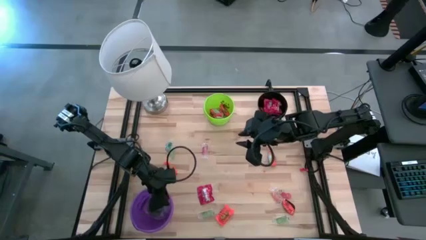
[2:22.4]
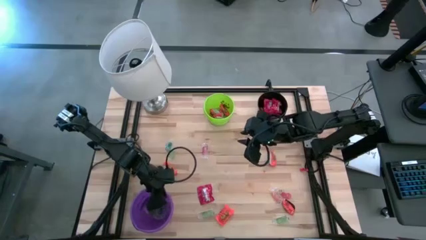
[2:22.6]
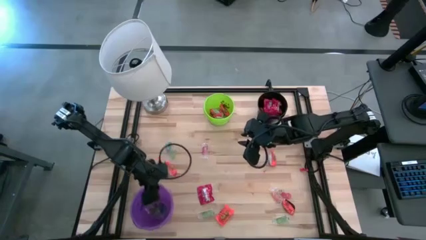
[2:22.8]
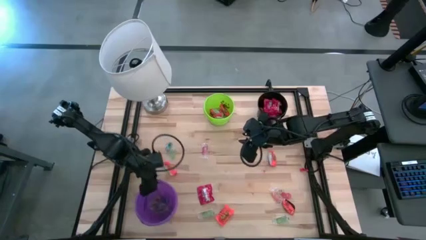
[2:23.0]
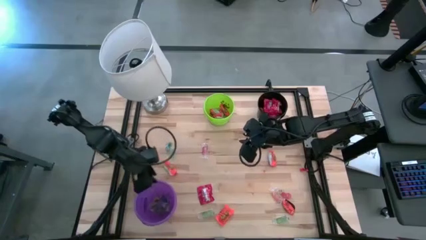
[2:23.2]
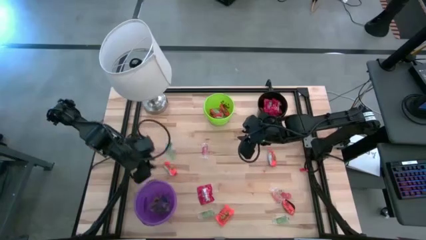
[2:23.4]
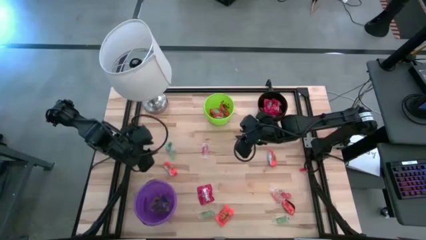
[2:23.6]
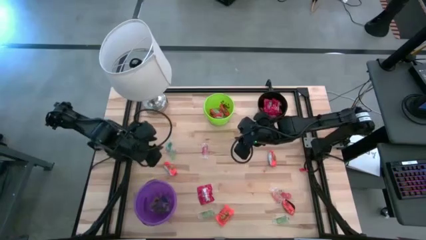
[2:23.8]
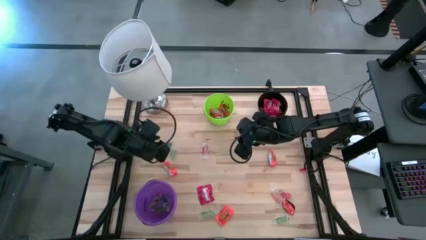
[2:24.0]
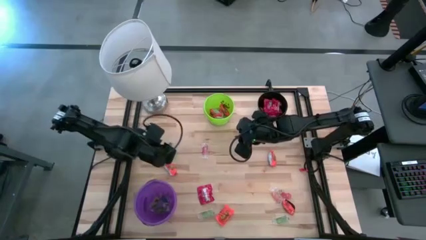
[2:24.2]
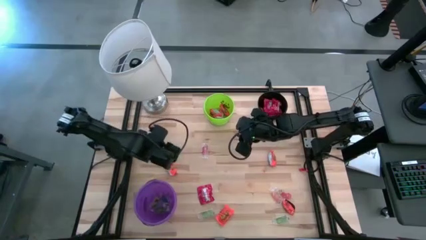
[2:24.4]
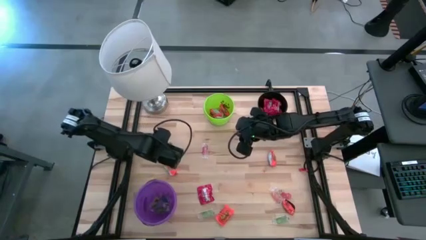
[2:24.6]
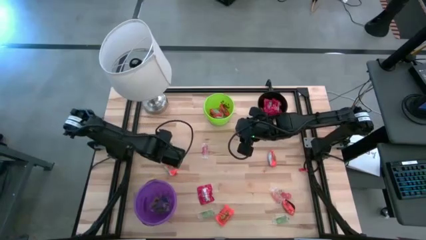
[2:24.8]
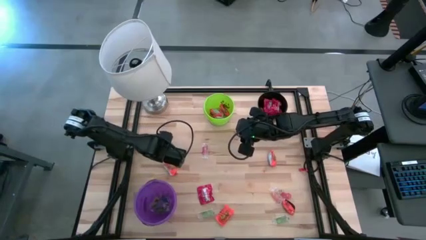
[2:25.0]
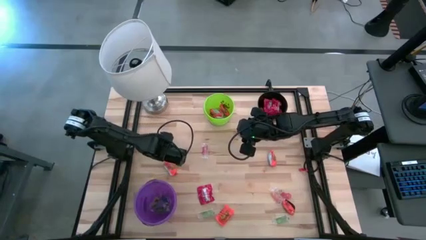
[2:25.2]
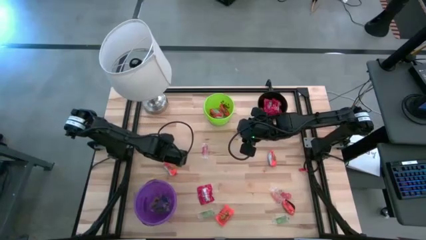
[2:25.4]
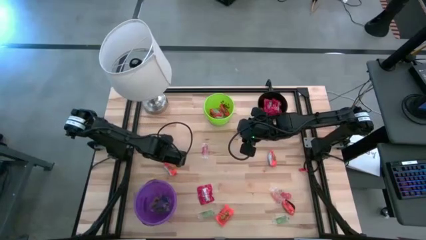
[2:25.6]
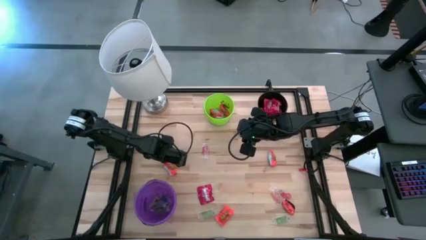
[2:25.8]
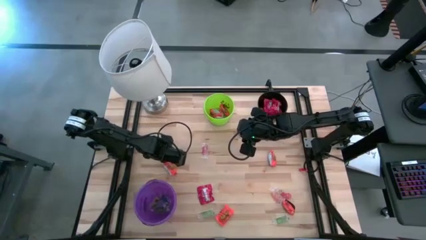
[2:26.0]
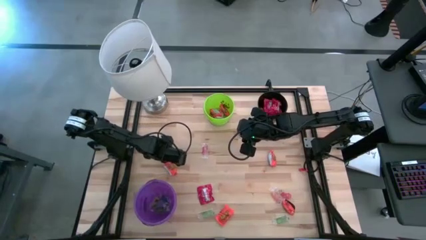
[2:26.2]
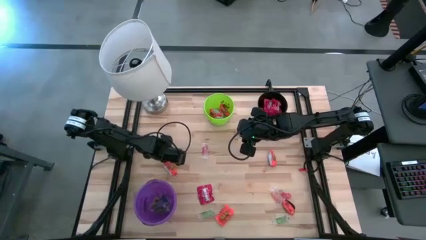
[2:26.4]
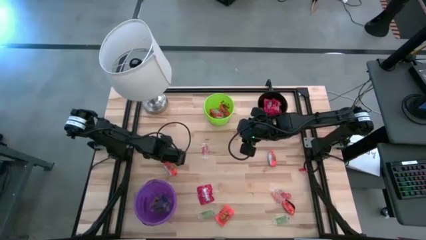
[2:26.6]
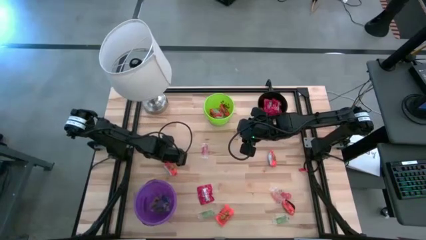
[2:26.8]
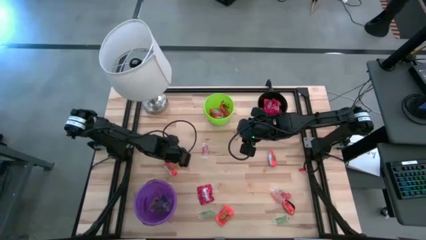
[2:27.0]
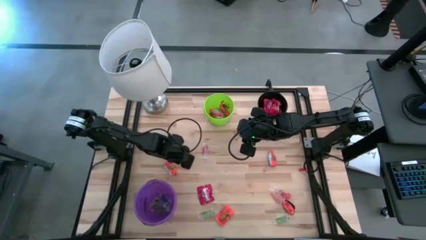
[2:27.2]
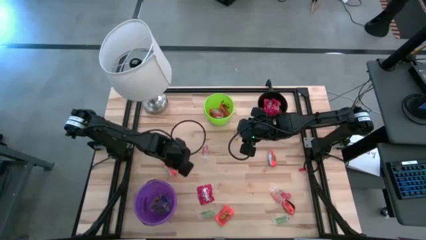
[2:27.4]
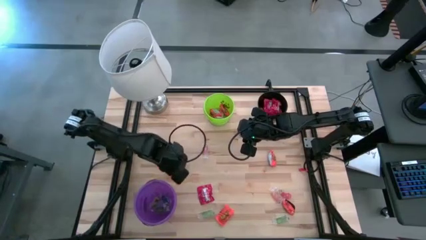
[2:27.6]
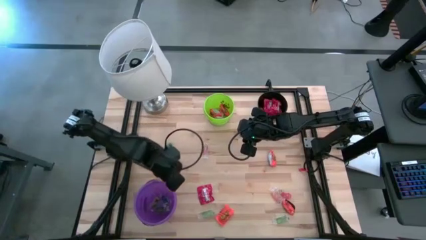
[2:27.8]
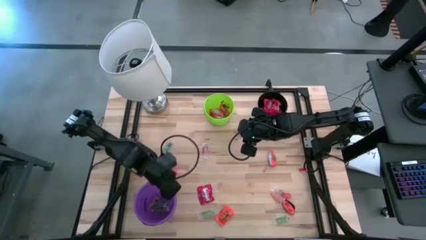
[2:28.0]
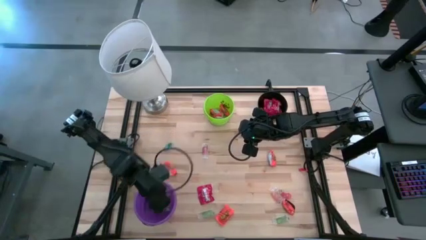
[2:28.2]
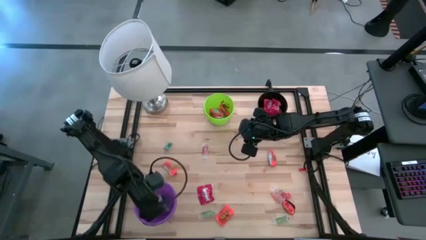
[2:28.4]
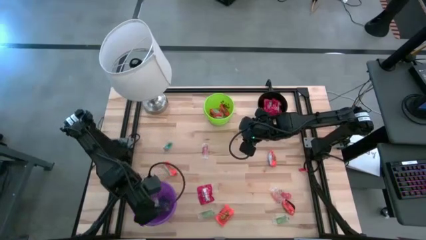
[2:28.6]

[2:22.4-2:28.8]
Task: Sort candy
Put the green gummy into the violet bucket

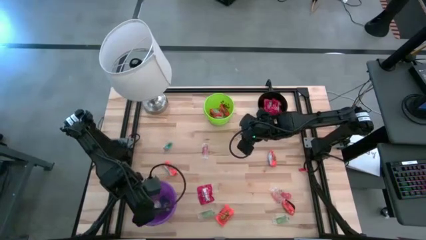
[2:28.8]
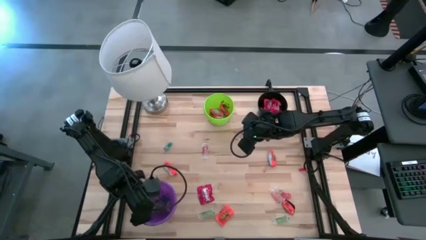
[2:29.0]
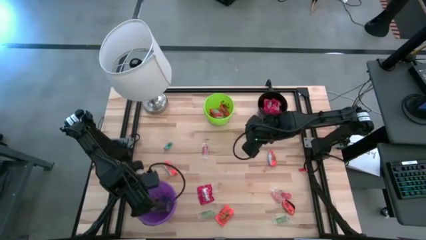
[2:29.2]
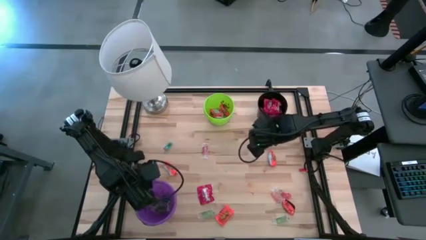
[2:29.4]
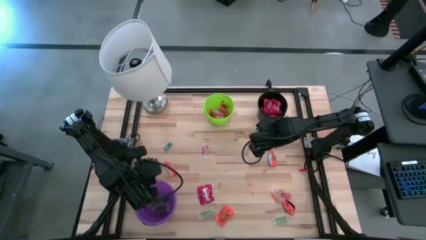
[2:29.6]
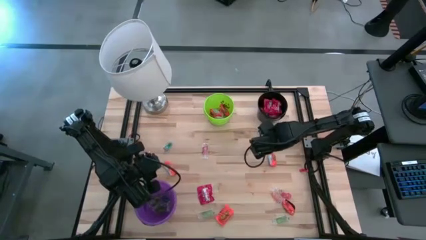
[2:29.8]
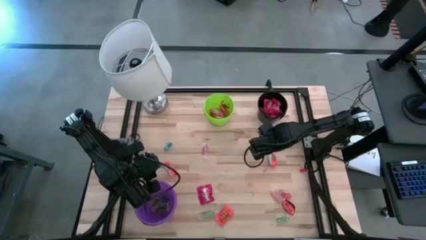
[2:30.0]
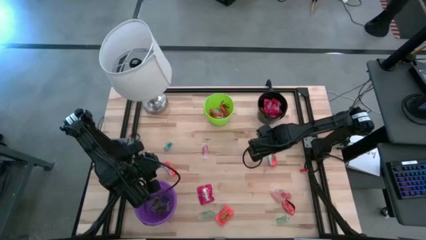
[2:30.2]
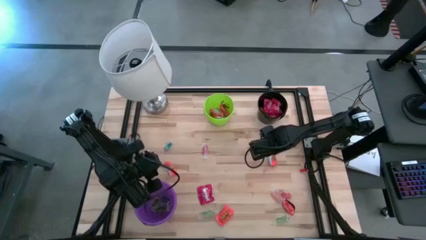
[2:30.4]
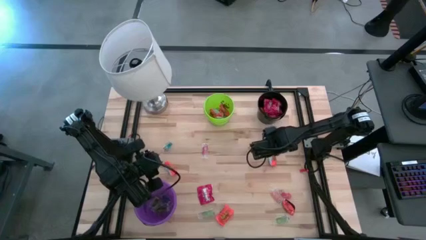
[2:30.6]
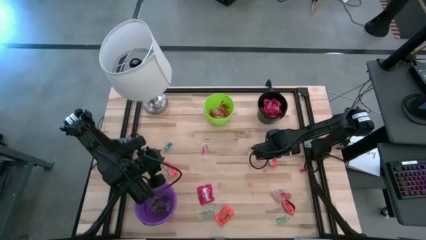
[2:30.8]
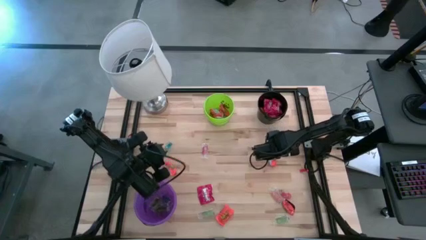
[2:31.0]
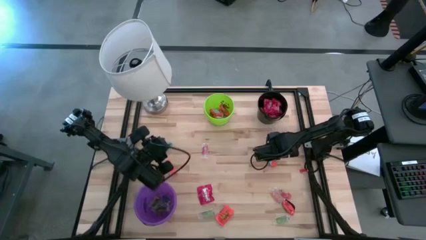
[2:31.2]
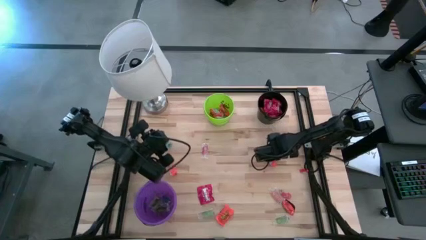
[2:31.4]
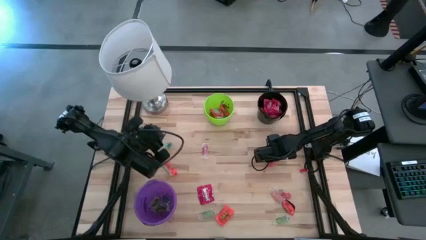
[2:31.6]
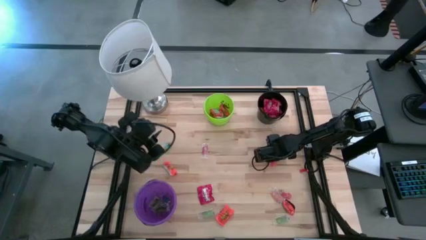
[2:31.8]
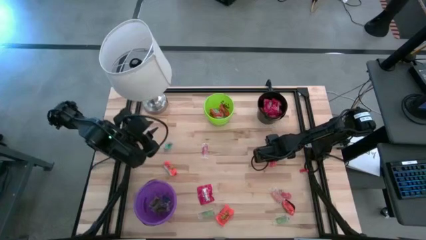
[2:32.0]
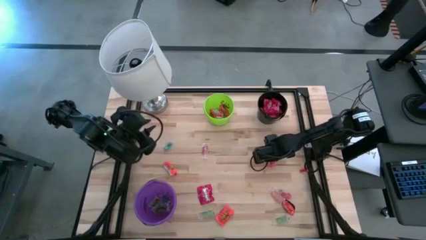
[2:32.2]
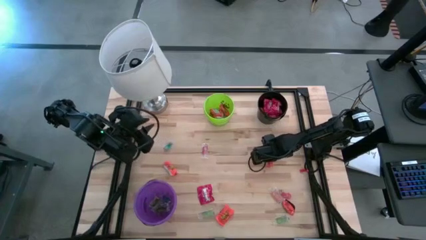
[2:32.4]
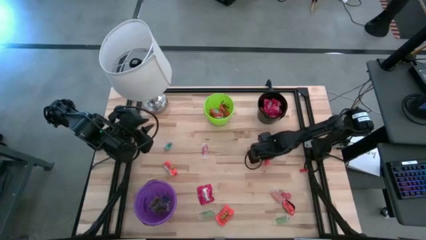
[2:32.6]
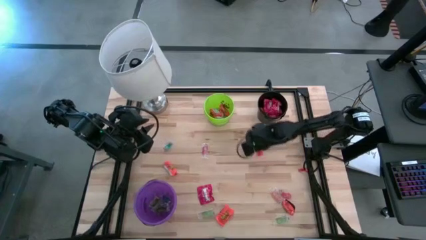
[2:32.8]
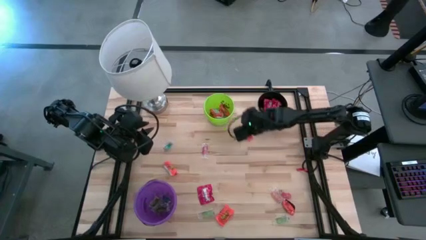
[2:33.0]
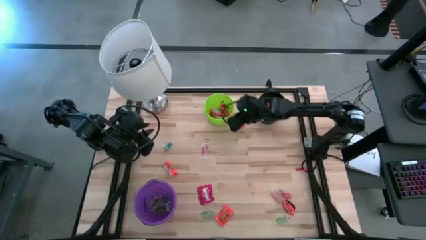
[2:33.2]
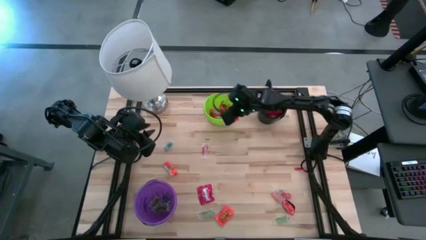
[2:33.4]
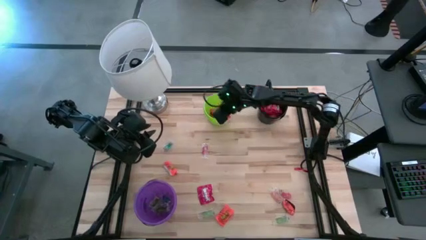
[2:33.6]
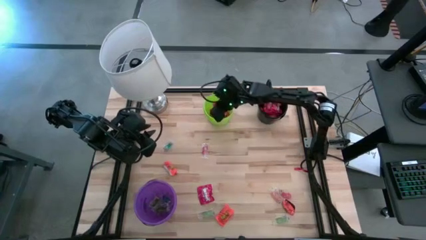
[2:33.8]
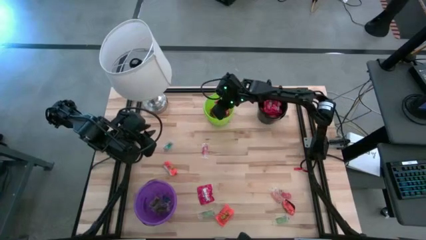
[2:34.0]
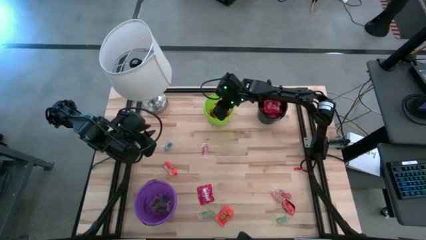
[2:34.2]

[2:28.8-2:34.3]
Put the orange chocolate into the green bucket

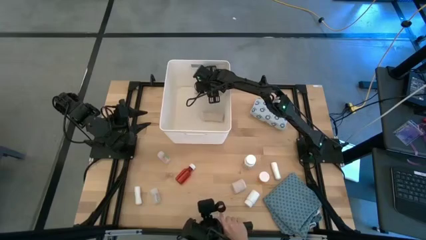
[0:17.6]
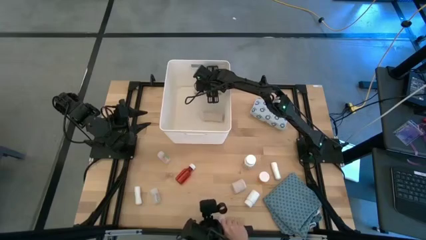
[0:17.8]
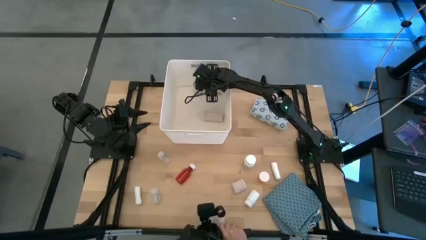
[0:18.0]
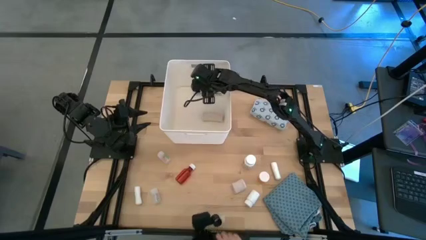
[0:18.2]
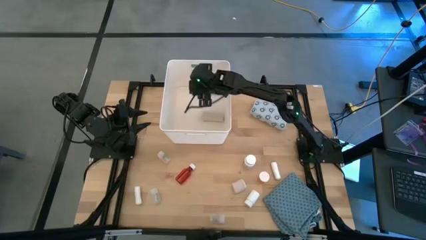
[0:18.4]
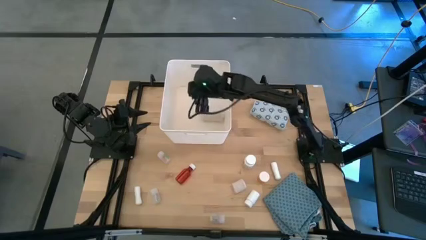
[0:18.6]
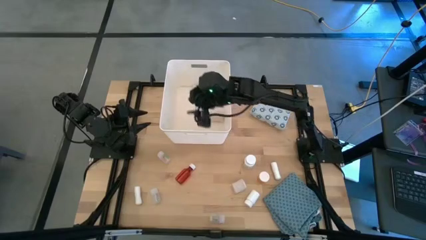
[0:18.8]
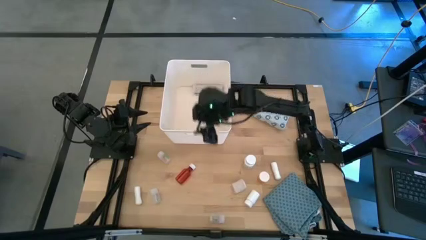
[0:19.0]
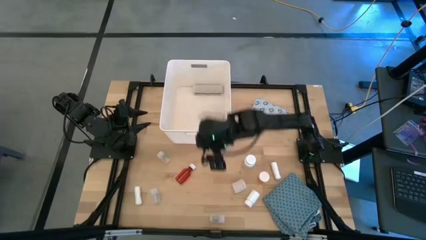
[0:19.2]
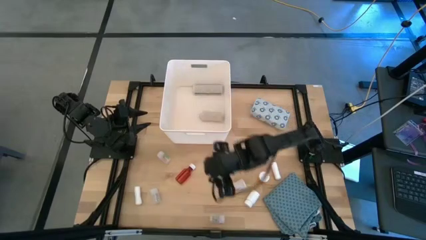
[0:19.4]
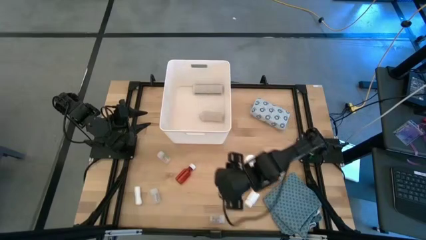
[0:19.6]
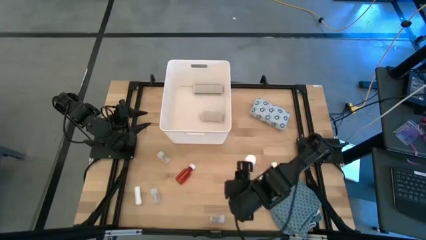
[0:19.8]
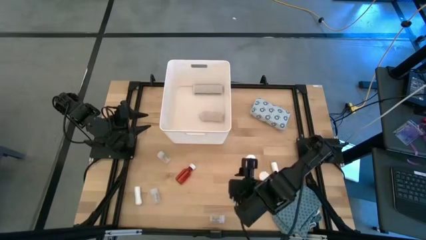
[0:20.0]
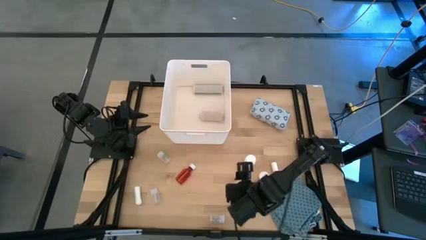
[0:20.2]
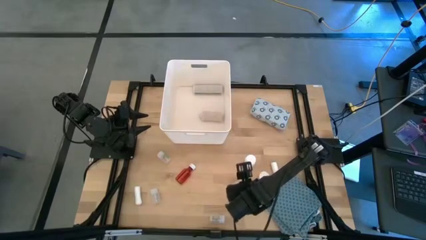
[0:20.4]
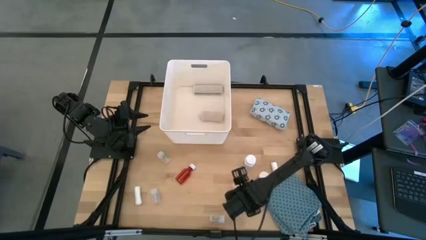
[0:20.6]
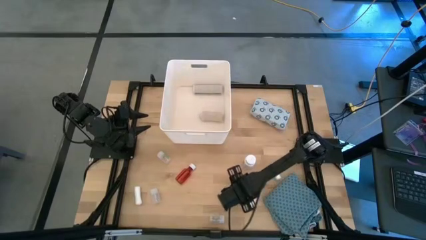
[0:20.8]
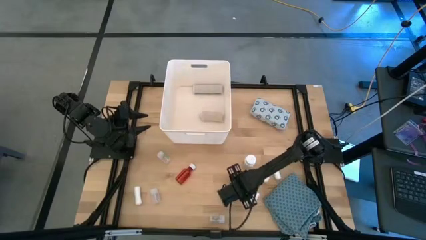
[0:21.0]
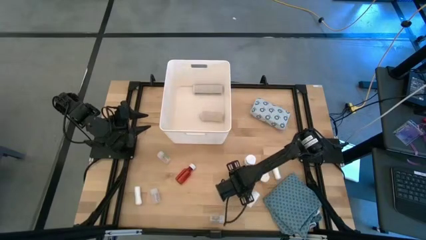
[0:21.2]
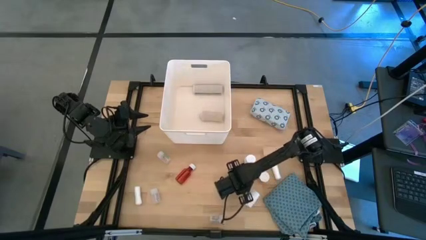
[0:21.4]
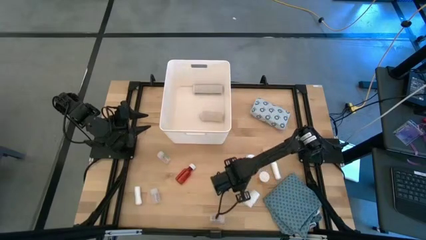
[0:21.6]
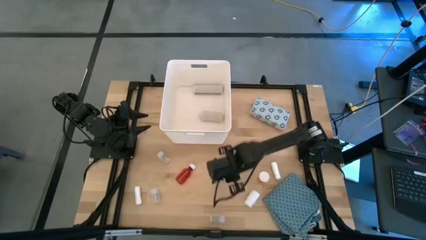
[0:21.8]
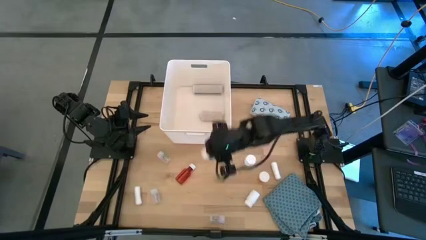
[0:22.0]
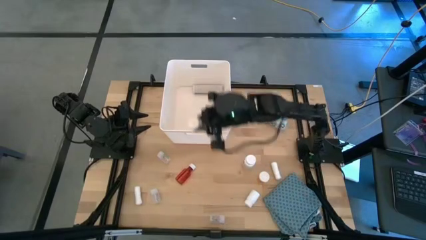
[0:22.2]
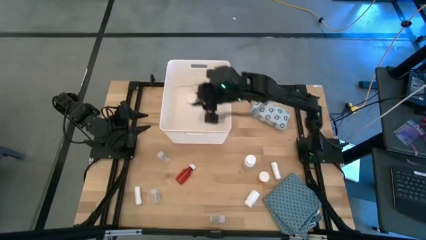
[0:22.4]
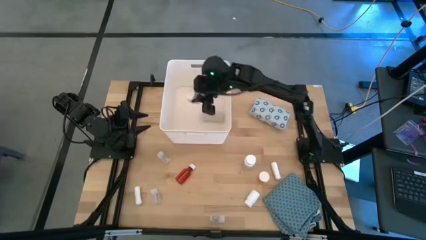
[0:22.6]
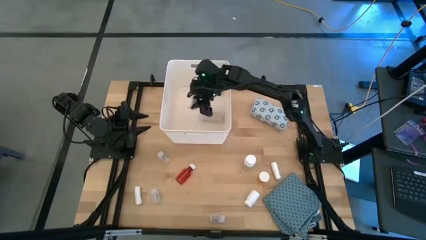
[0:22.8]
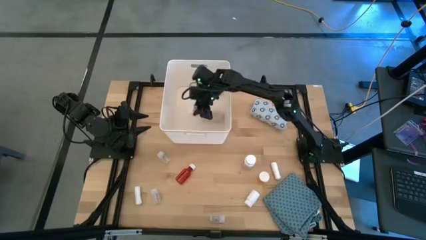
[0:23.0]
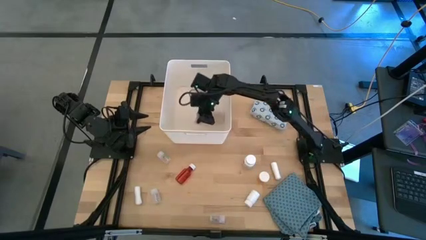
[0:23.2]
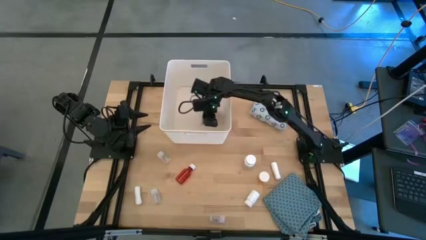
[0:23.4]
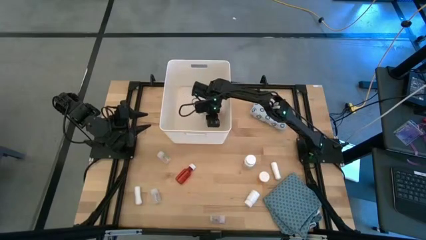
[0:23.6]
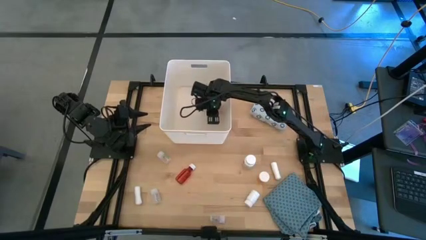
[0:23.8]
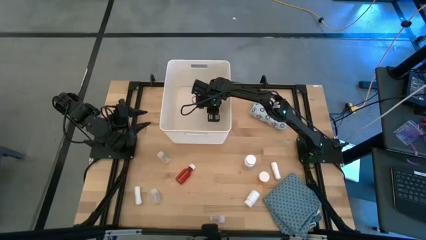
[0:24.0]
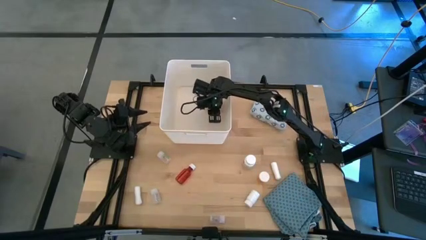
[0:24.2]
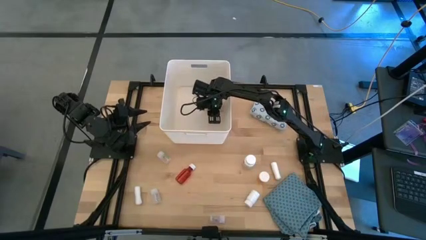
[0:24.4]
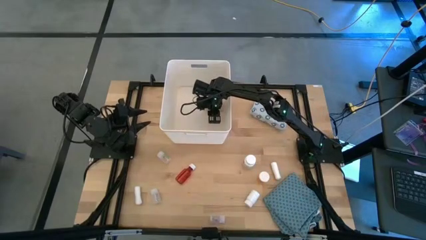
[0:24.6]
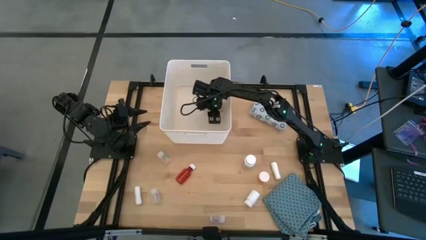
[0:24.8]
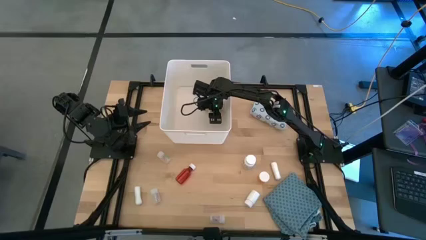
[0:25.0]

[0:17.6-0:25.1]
Task: Pick & place medical supplies in basket/bin
Put the white bandage into the white bin
